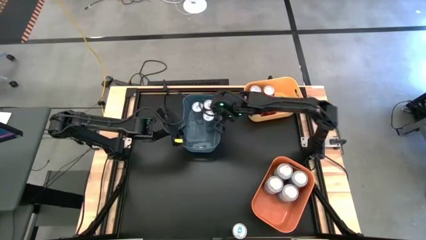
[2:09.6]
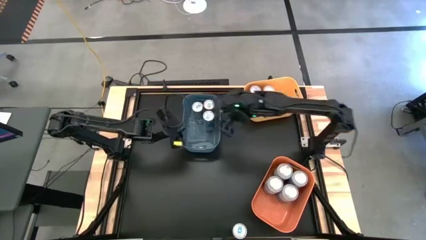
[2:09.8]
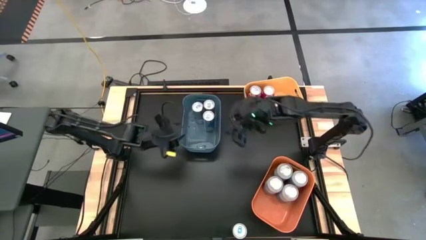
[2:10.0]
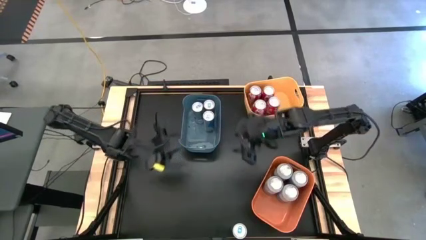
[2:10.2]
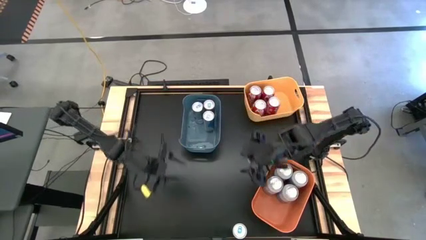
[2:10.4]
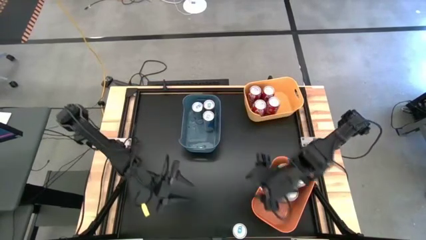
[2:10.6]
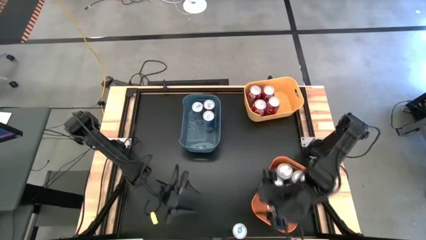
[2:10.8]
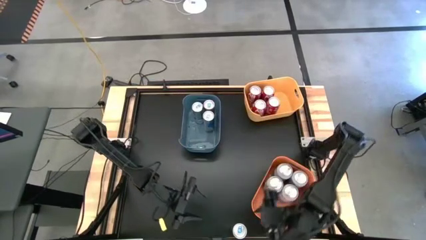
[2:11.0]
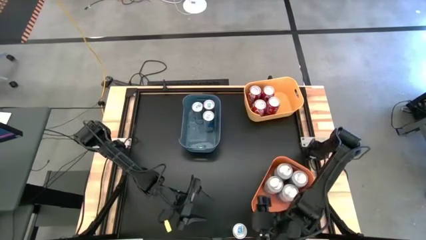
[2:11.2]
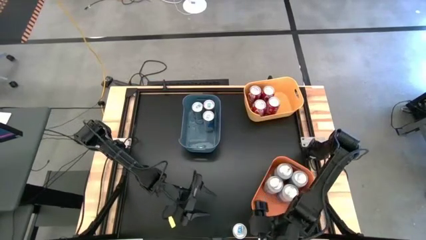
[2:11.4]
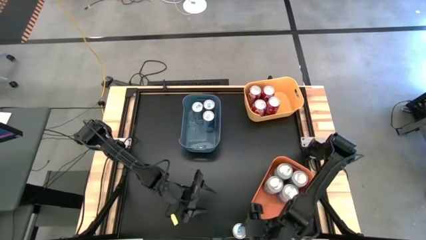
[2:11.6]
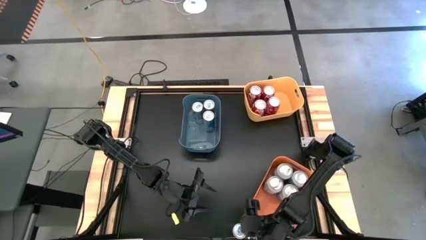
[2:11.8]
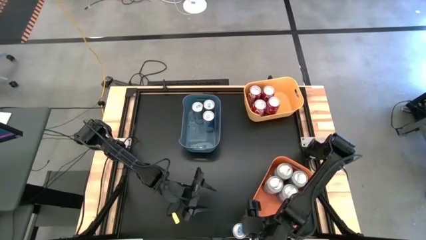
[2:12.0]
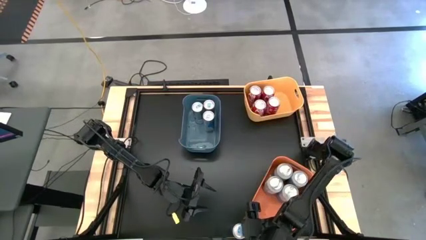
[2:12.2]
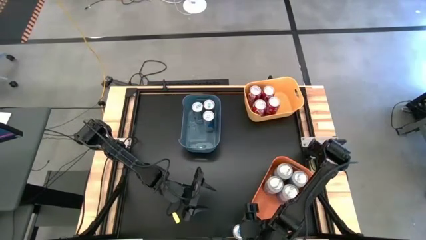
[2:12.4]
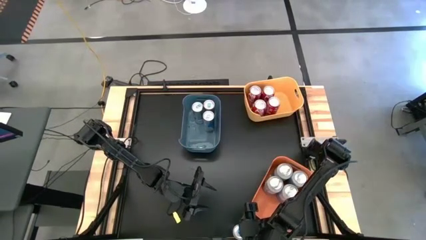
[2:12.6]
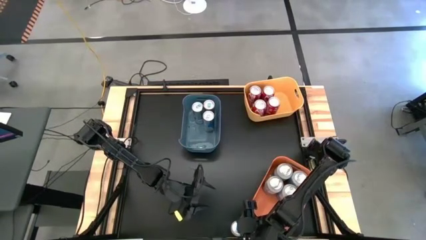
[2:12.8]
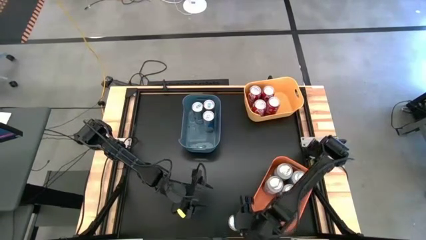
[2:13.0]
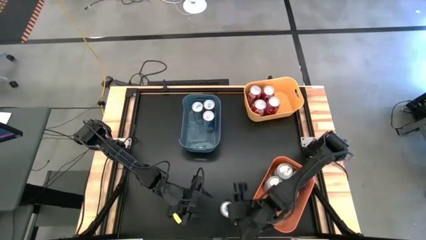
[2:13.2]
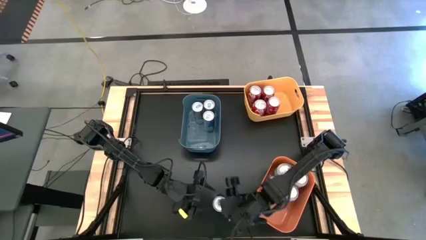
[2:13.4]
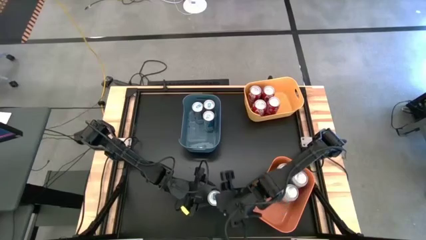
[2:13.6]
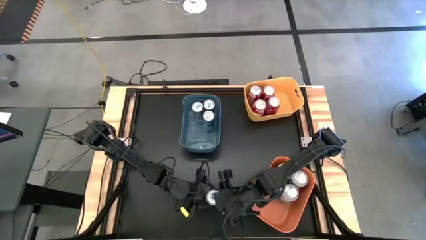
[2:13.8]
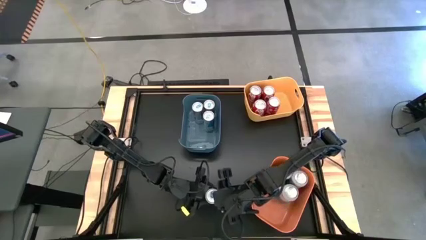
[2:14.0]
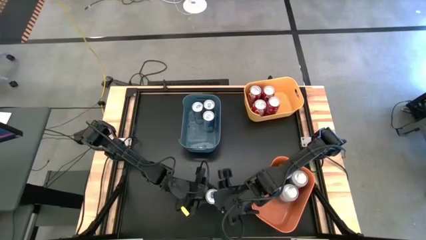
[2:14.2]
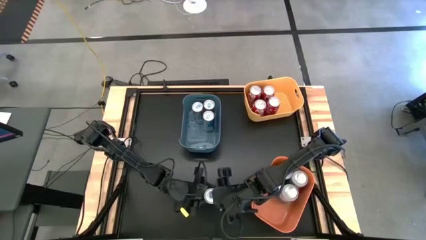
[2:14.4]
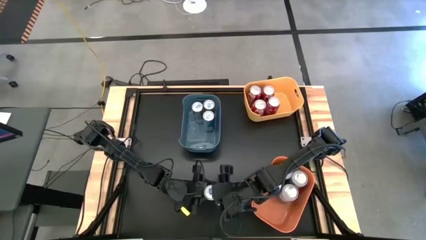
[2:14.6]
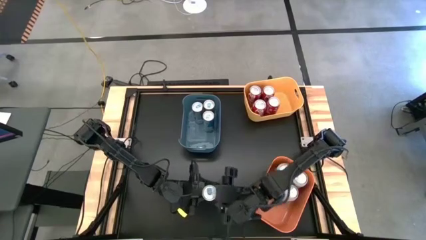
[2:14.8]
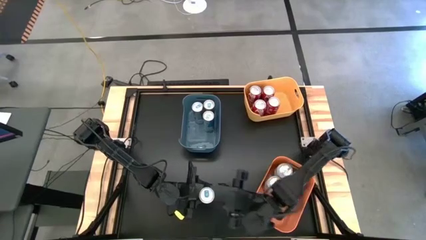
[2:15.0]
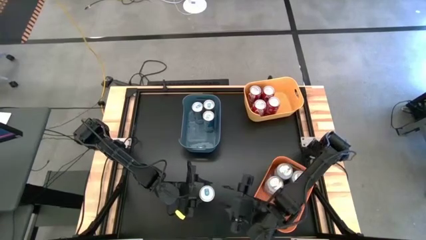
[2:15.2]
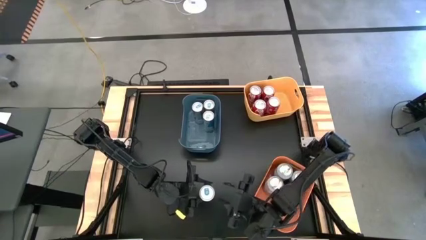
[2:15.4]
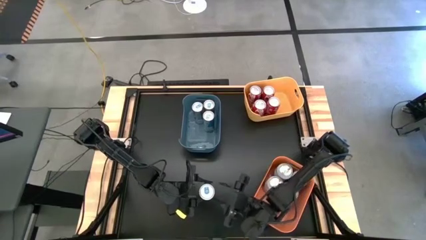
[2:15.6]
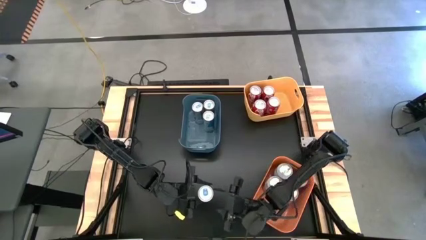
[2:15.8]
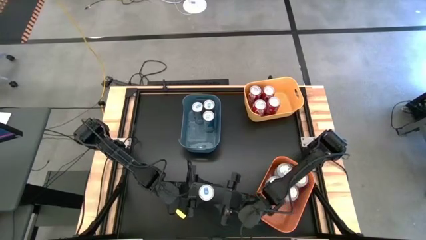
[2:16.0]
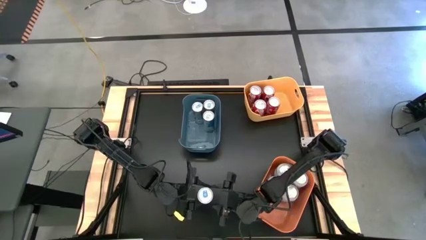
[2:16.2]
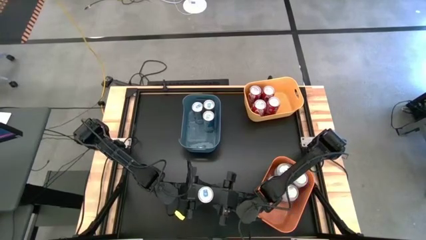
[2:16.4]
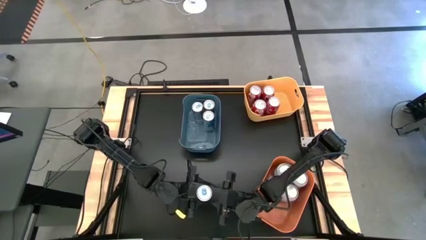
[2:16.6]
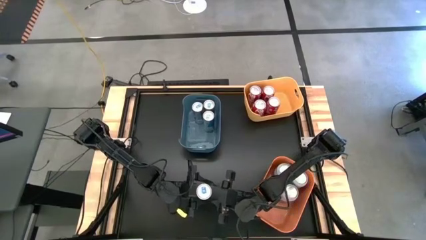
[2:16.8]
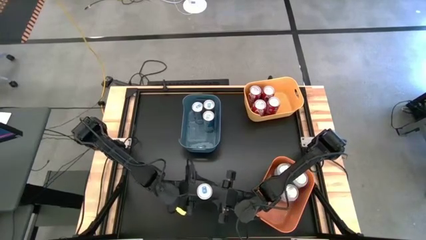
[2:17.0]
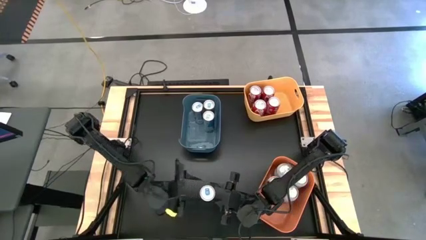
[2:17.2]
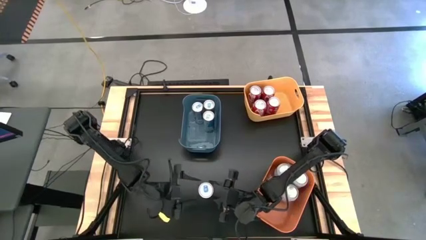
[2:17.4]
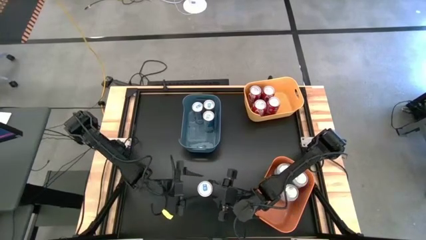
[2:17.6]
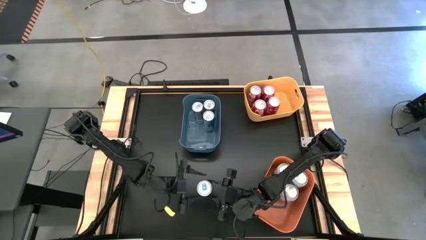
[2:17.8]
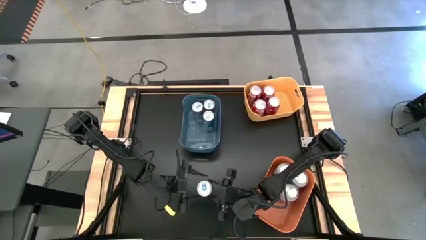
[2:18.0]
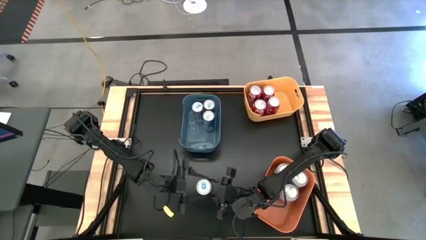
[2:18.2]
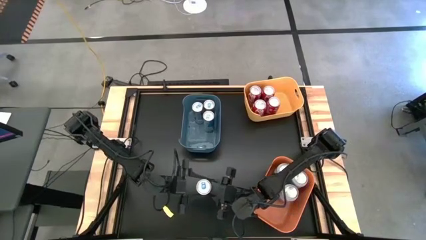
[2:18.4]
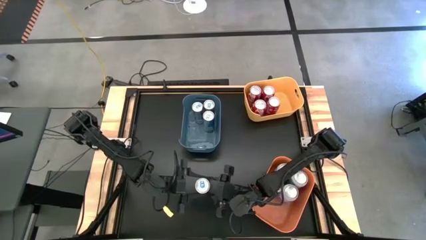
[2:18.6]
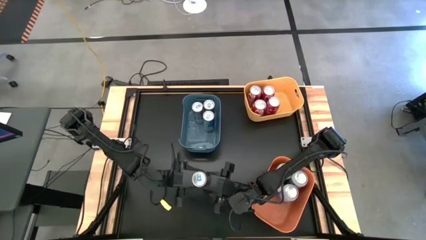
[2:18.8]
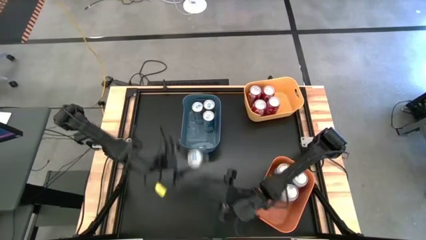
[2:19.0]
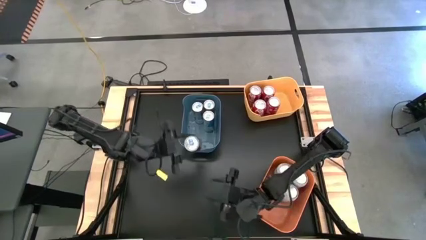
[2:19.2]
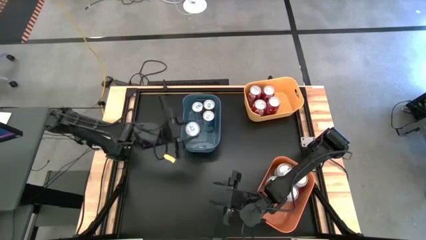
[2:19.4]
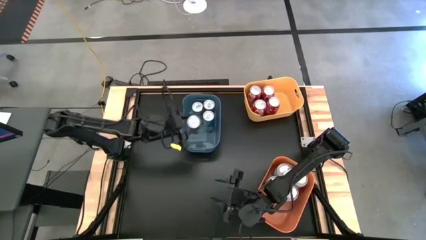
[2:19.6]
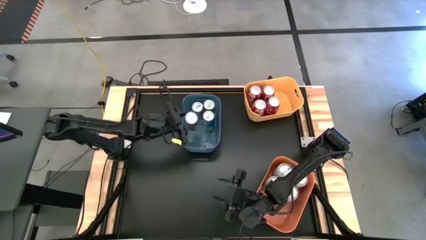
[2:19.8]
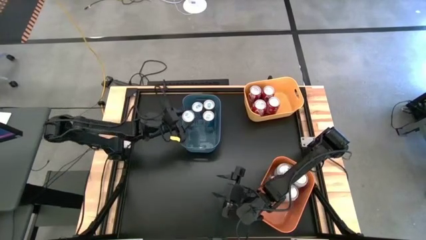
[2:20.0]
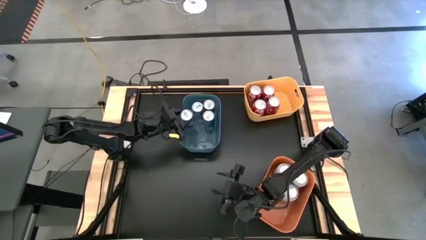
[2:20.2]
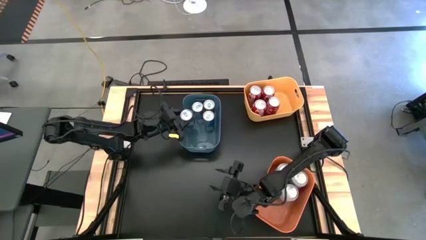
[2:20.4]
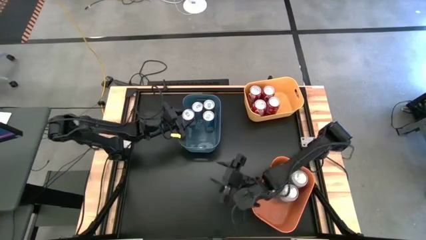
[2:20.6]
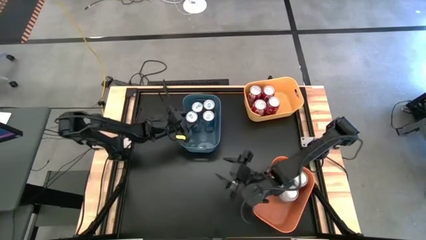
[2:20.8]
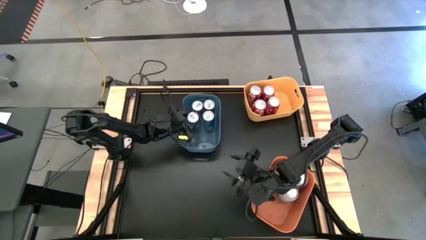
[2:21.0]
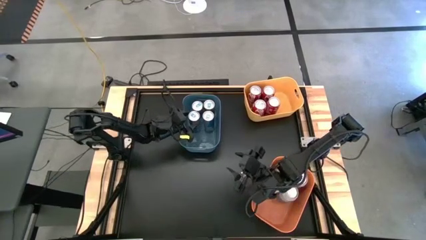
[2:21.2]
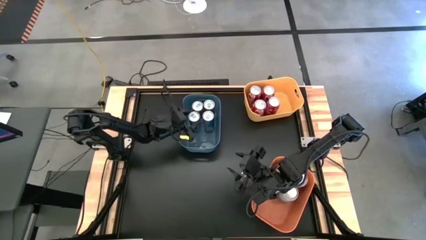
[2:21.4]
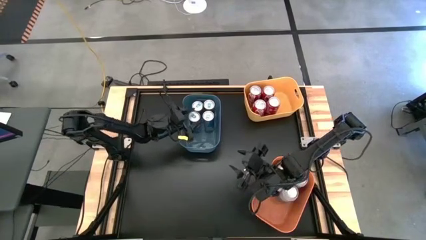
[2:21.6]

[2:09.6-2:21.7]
Task: Sort soda cans
Put the blue soda can into the blue bin

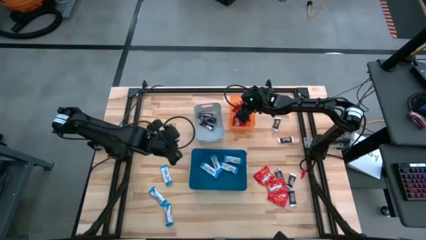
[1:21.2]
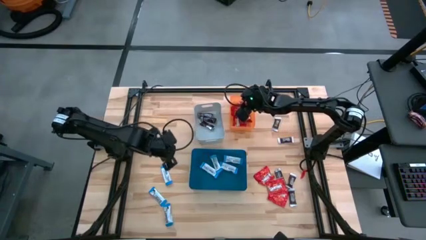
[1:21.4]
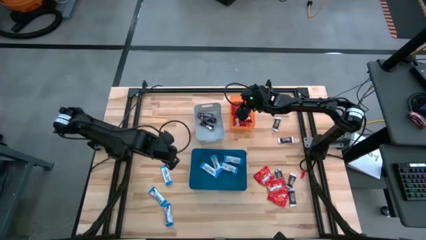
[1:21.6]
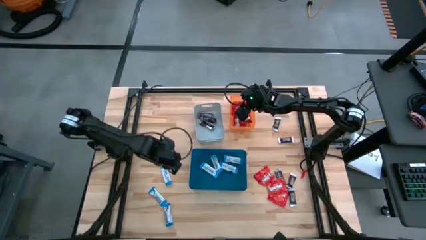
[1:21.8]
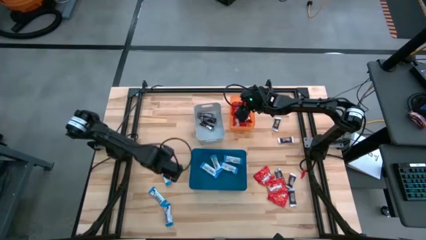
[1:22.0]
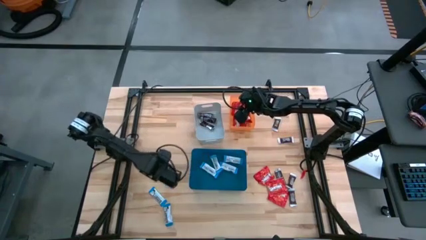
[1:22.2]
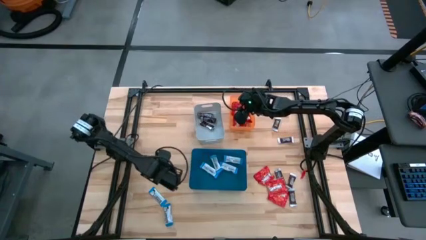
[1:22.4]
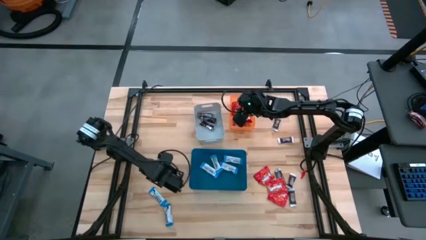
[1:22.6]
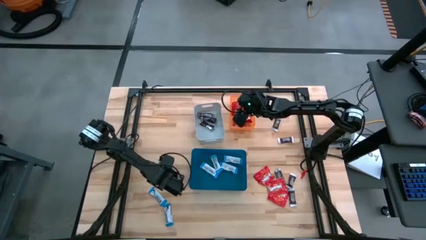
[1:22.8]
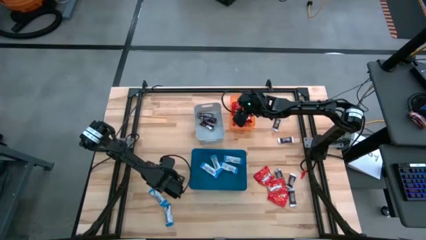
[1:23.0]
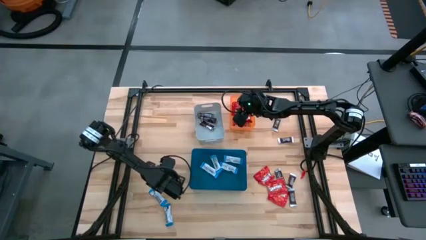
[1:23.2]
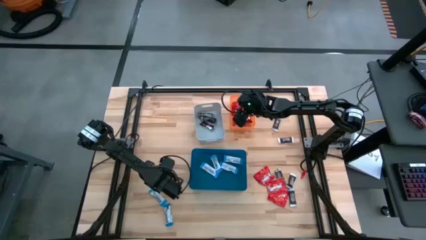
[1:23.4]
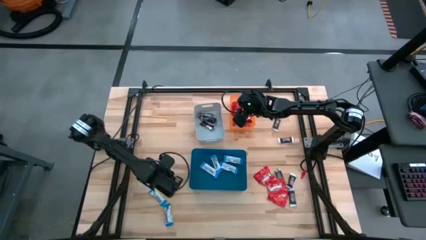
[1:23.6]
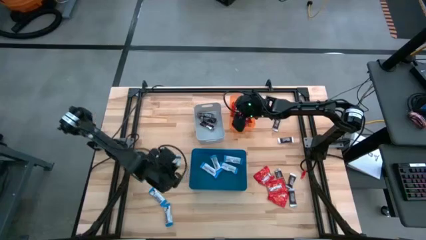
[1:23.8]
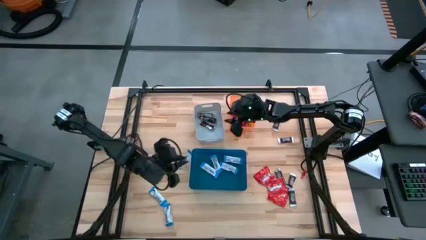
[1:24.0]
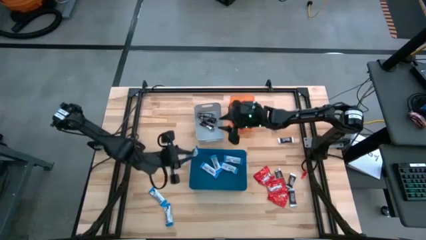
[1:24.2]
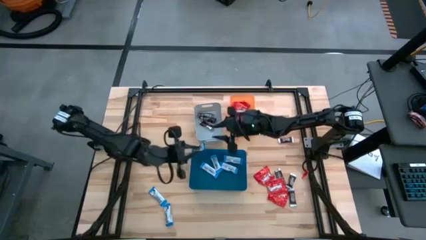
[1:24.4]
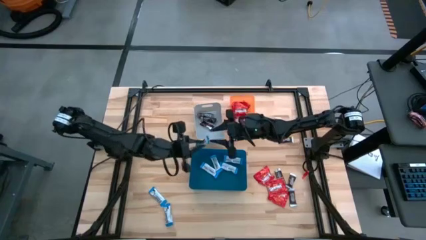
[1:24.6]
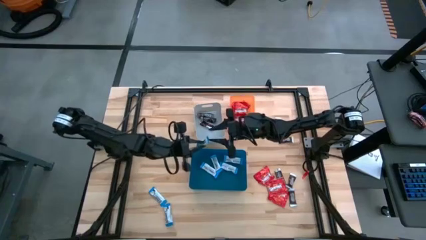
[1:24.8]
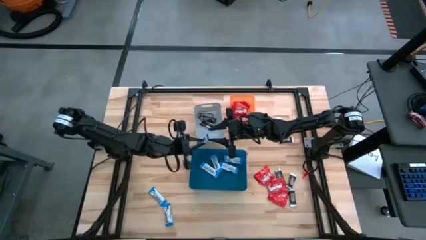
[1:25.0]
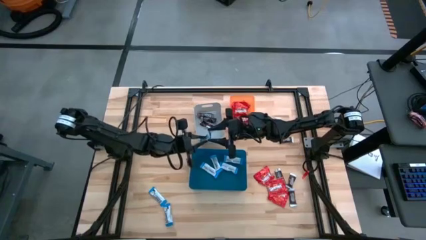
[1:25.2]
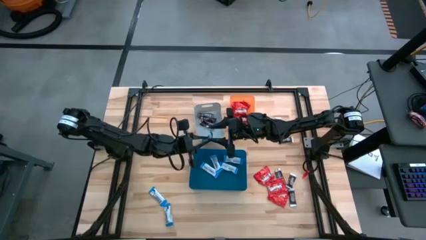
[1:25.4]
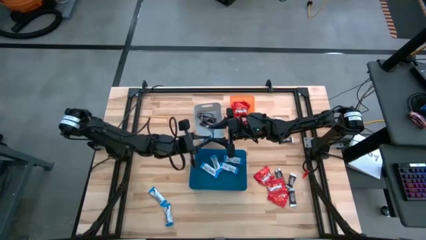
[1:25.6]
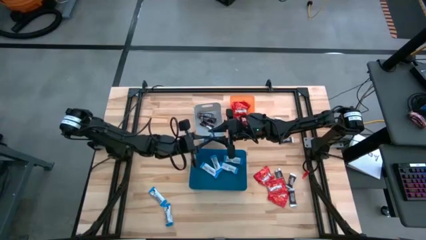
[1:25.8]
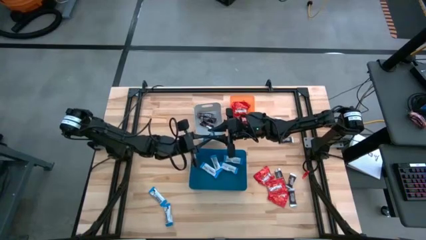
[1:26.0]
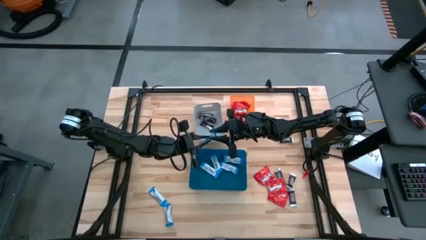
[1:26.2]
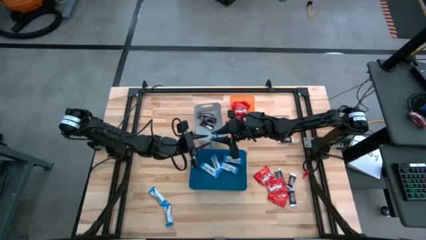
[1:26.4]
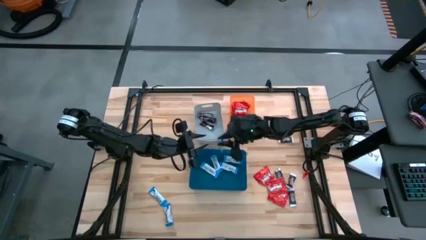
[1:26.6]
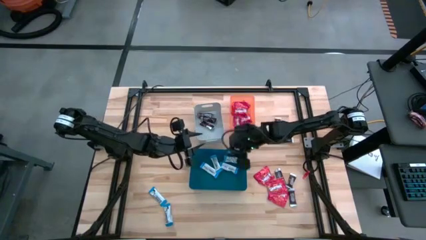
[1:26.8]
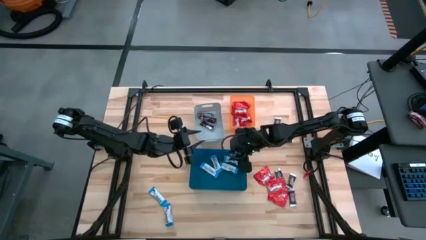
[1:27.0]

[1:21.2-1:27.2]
Task: Sort candy
Put the white chocolate bar into the blue bin
